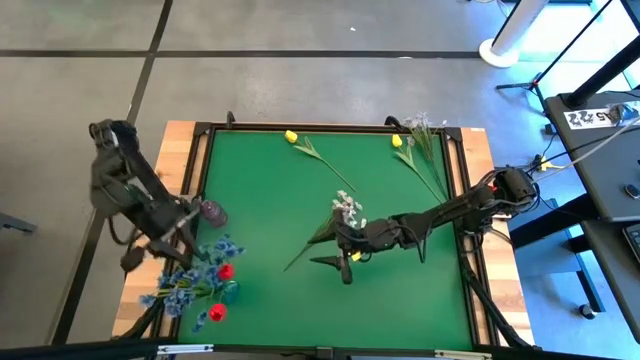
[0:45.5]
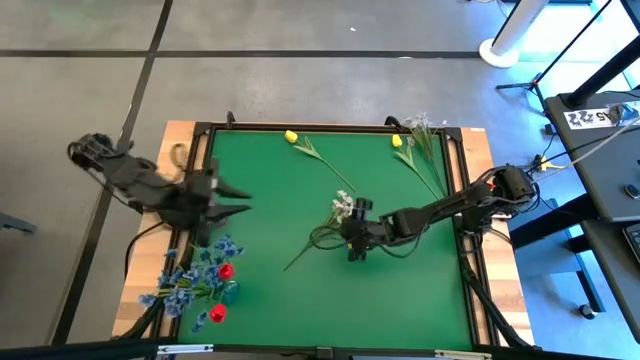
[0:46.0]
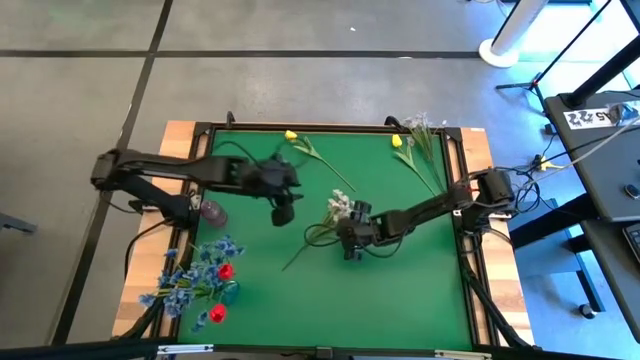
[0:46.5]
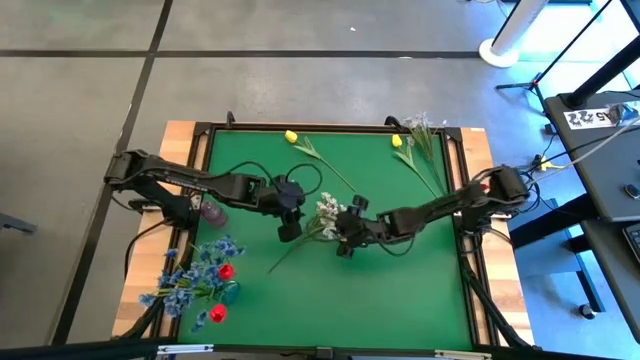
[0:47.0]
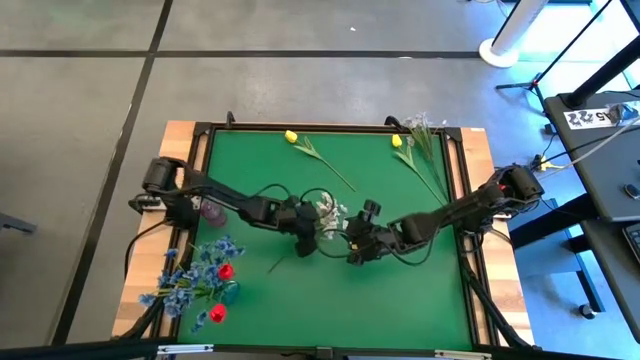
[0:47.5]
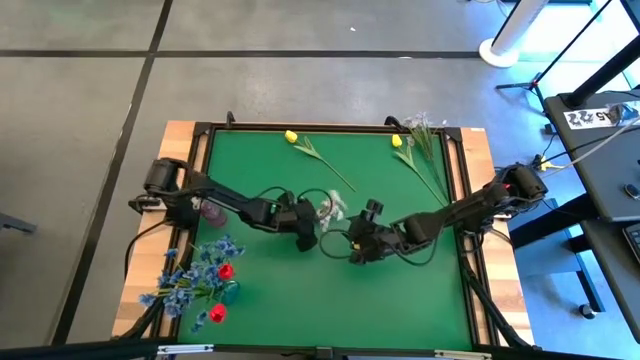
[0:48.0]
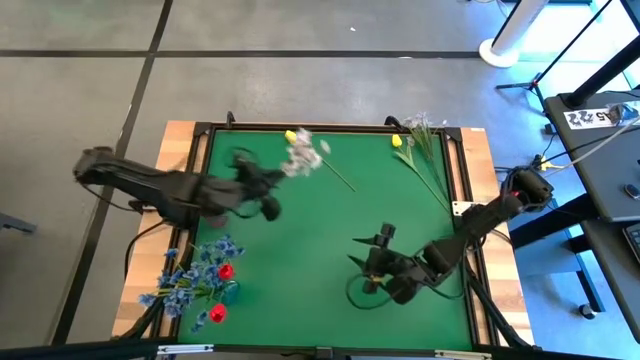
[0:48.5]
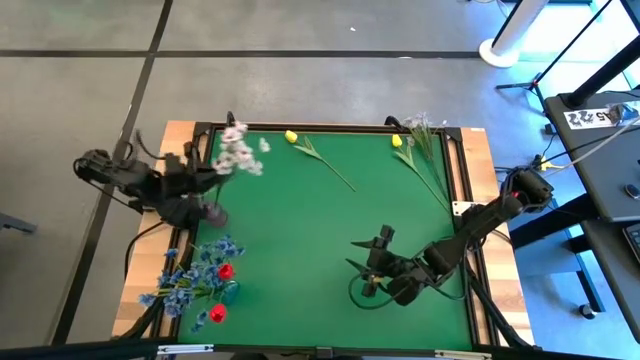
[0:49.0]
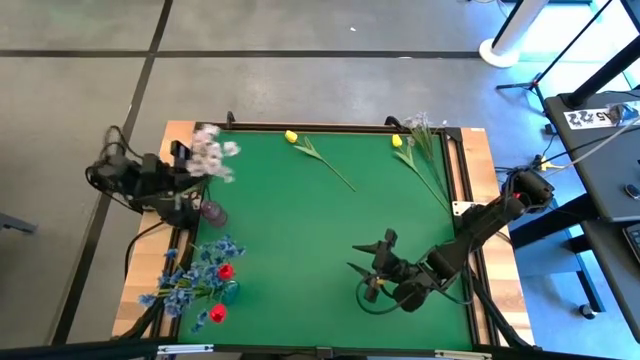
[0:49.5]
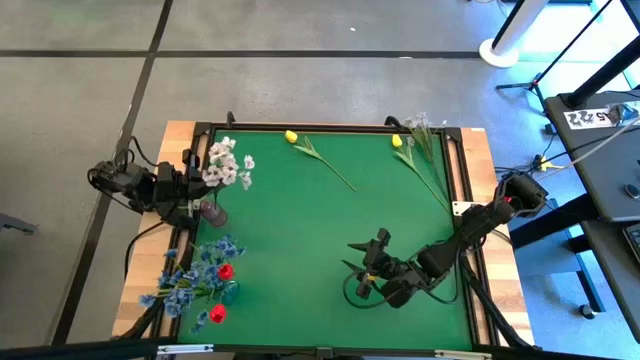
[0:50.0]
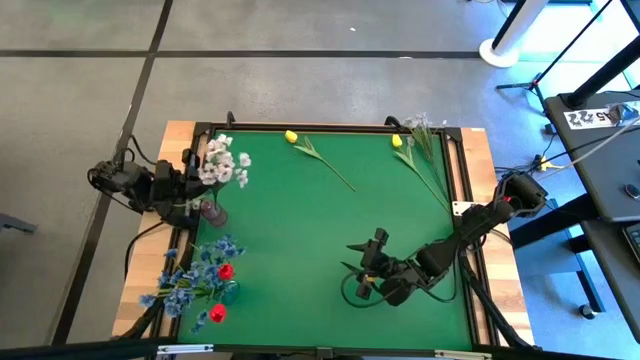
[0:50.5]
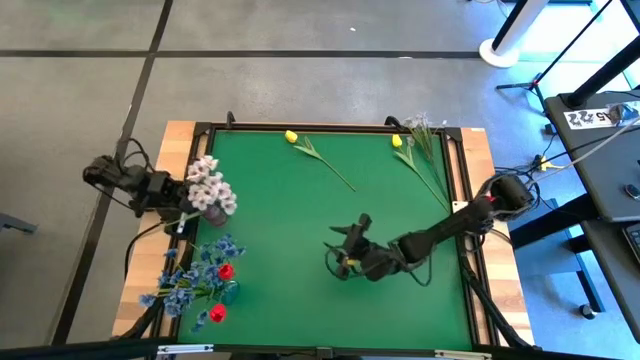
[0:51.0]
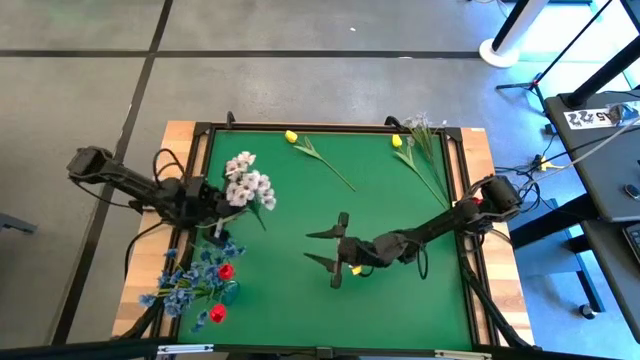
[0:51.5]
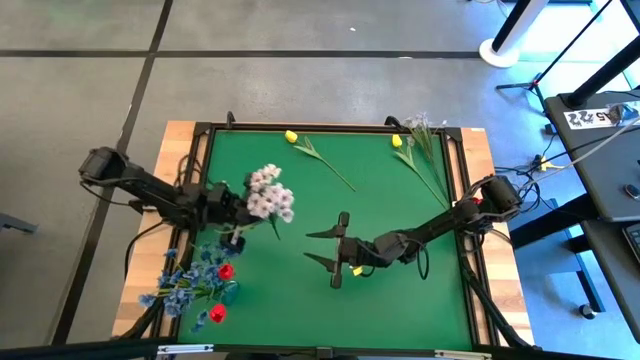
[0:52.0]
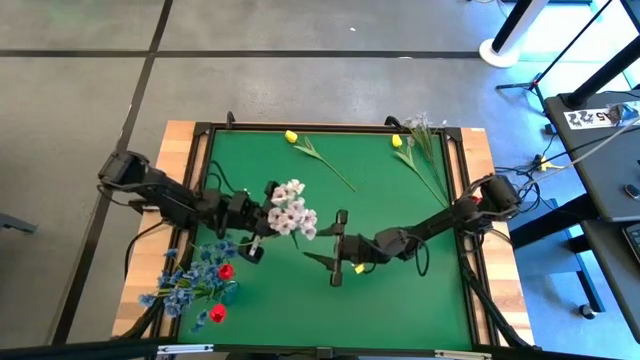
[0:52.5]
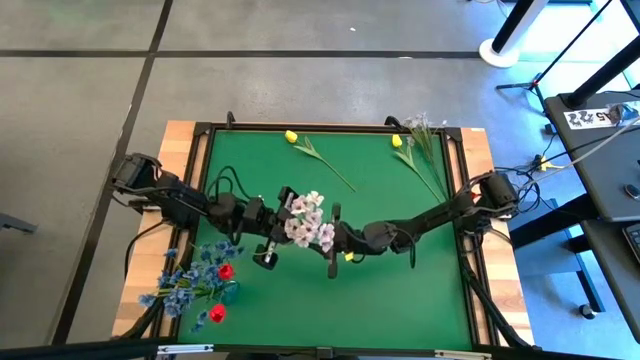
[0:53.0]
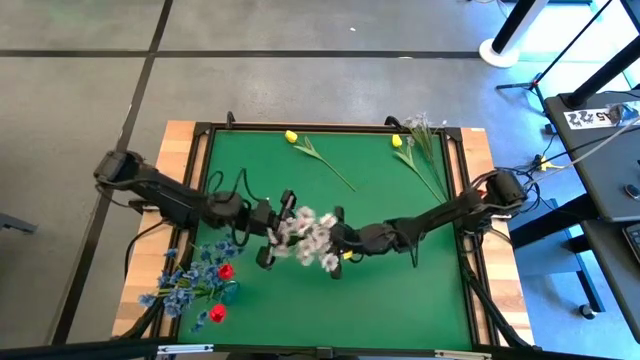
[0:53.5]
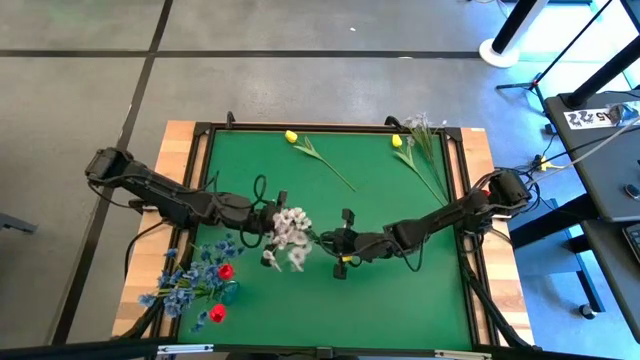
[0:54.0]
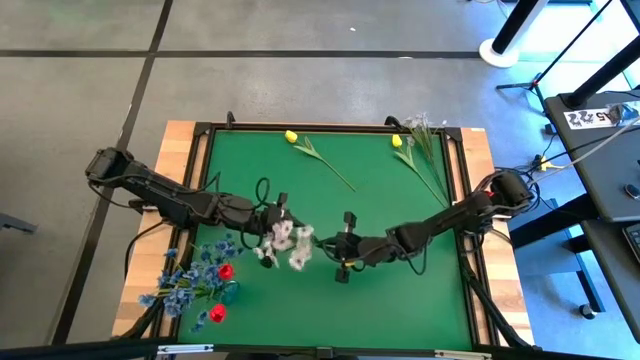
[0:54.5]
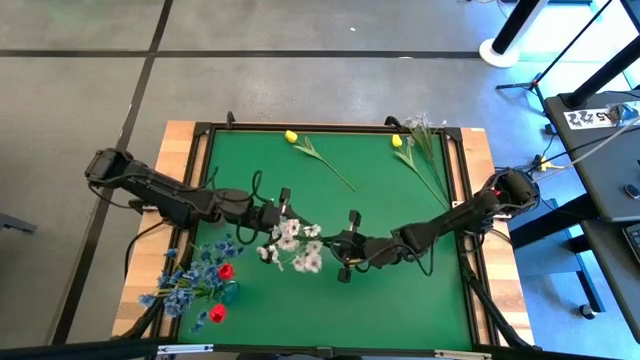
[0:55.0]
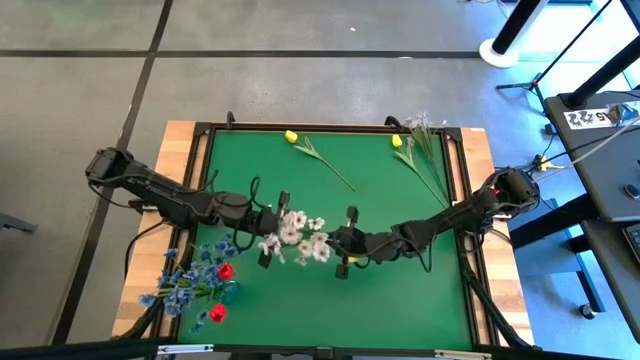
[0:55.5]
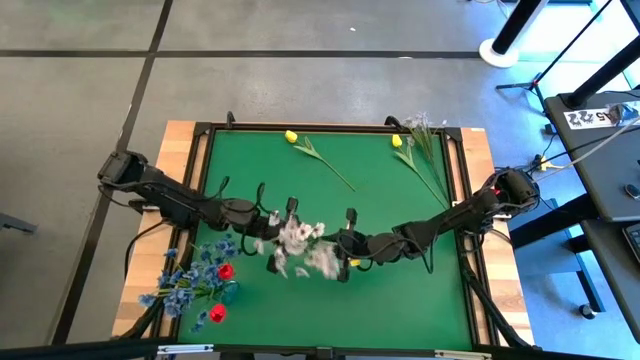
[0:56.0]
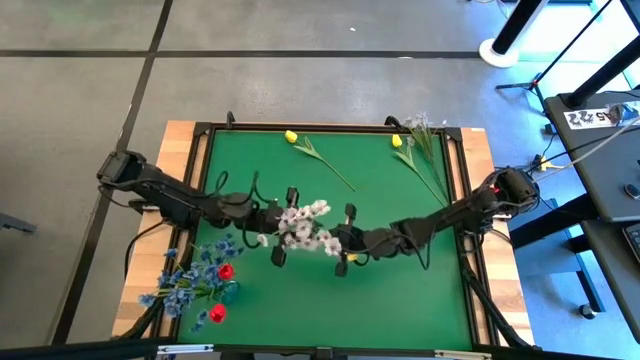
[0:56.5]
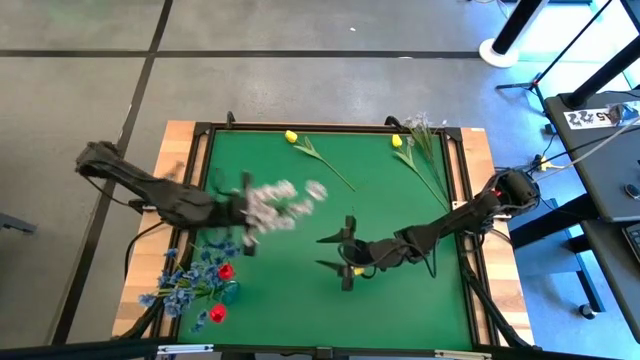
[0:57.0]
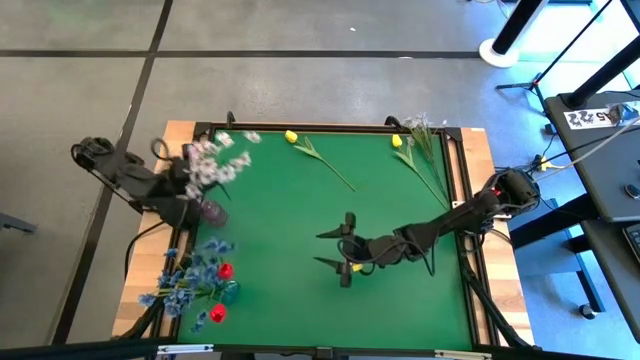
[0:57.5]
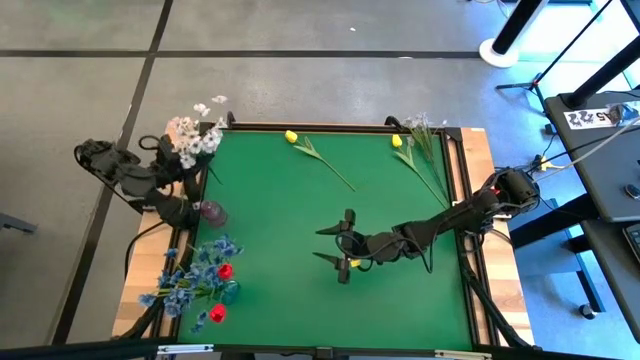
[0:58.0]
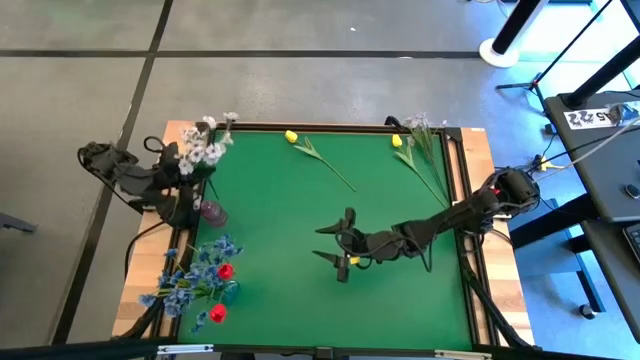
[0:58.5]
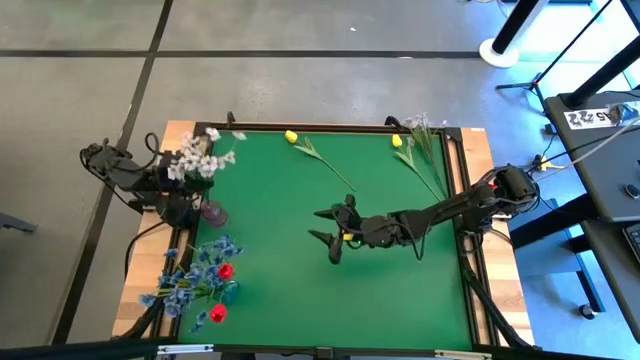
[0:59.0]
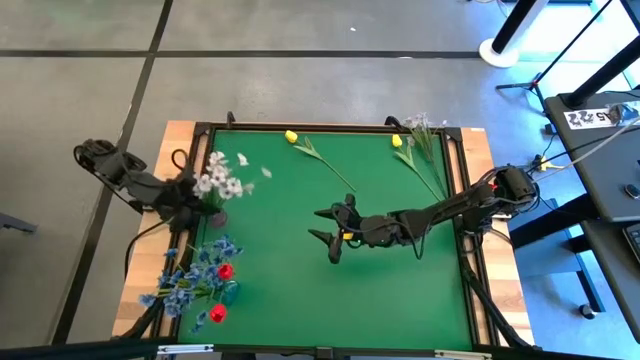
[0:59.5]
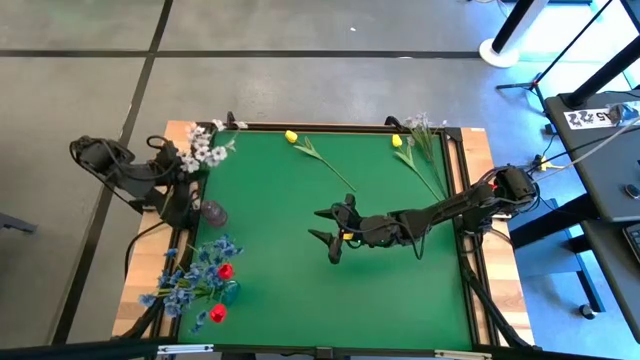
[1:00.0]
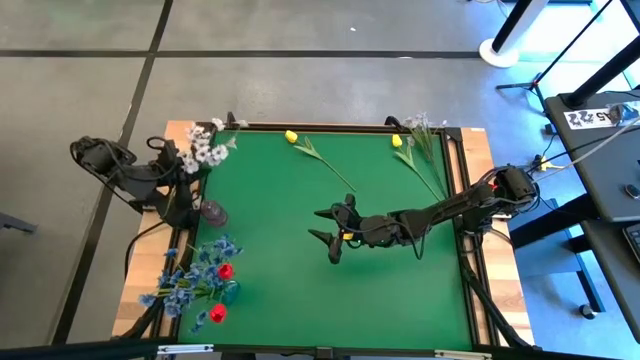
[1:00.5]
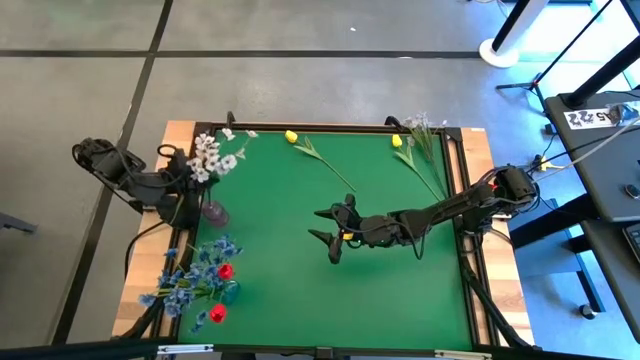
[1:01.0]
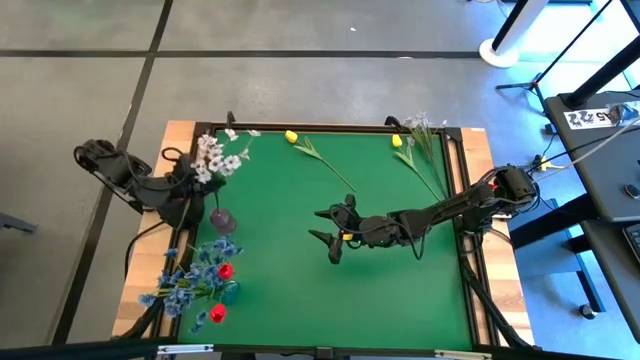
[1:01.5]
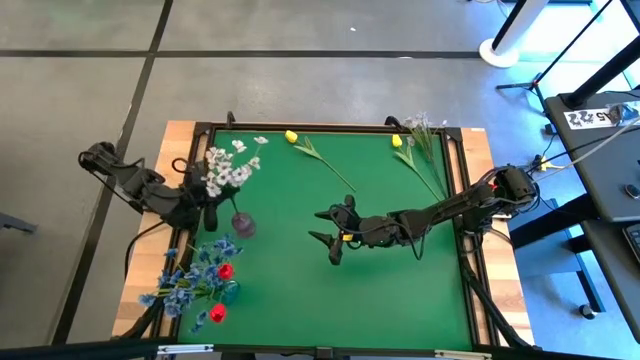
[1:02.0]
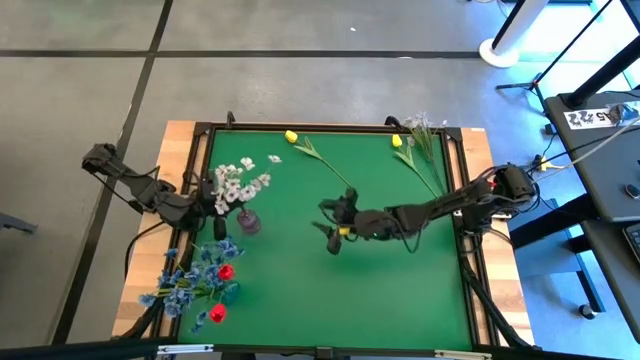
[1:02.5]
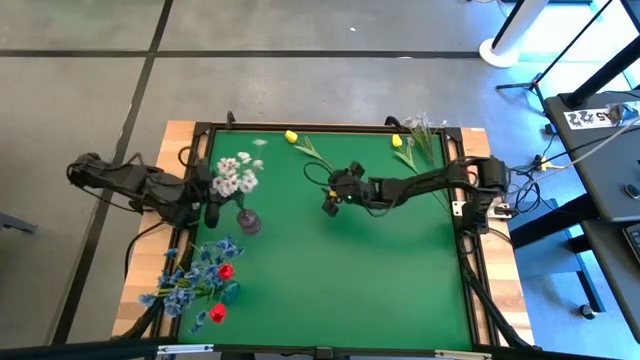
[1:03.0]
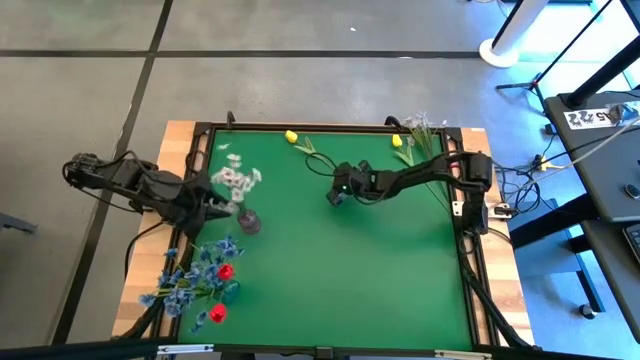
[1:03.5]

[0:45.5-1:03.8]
Task: Sort flowers into vase by color
Put the bottom white flowers into the pink vase

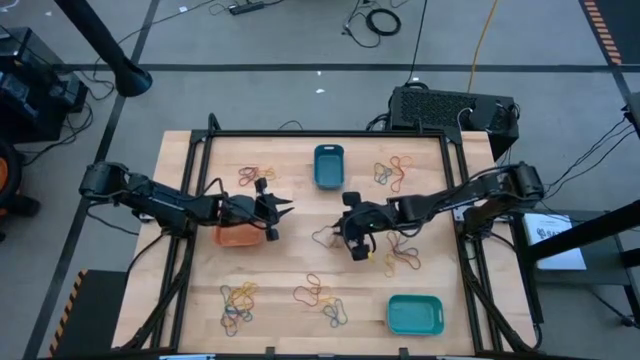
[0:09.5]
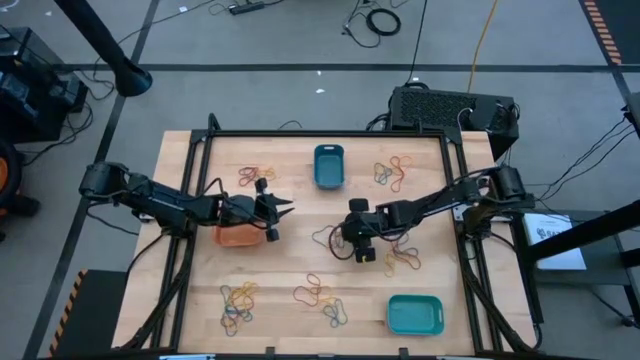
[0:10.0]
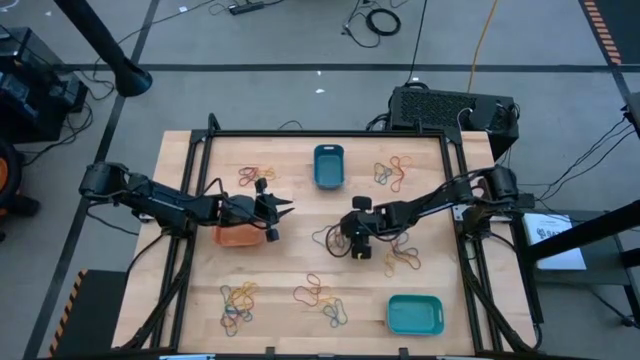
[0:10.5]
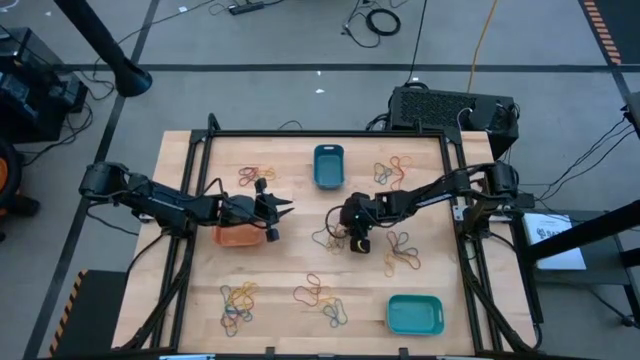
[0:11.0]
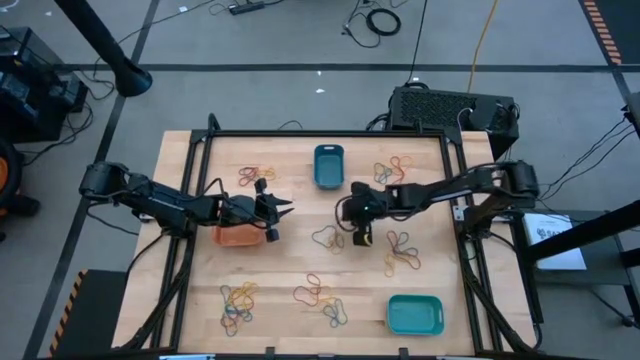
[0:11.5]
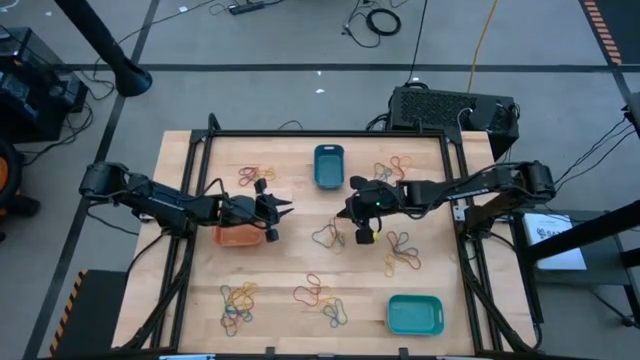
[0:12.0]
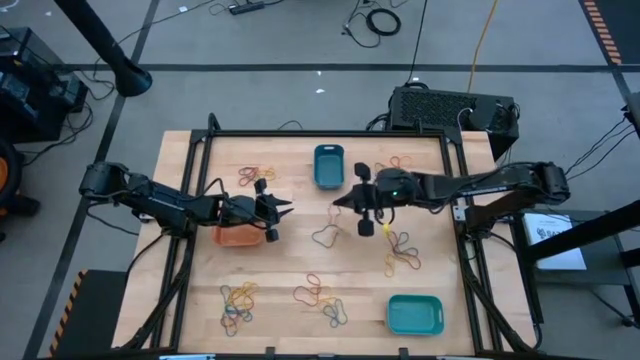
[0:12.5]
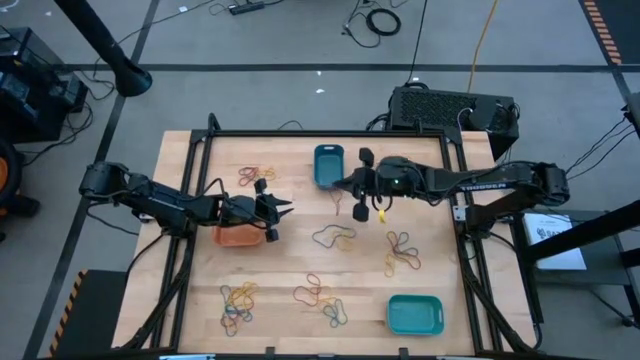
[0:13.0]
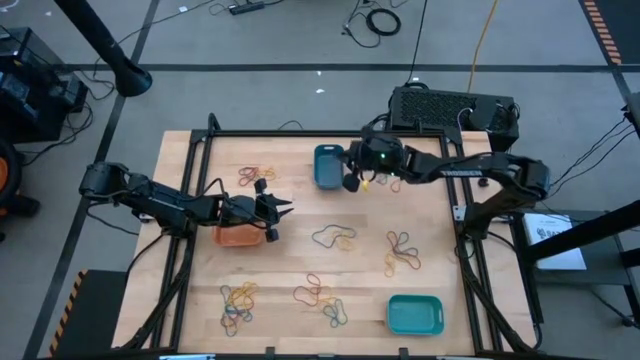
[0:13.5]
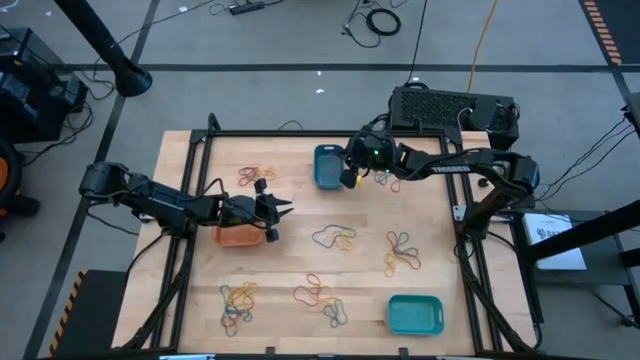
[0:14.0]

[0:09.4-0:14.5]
Task: Sort rubber bands into baskets
Put the center red rubber band into the blue bin
